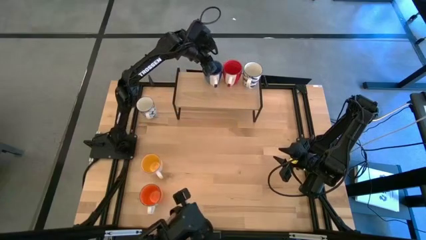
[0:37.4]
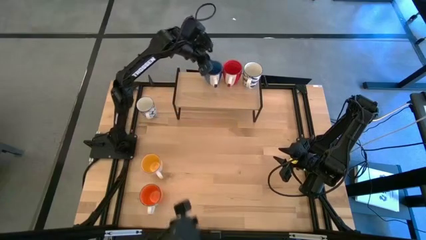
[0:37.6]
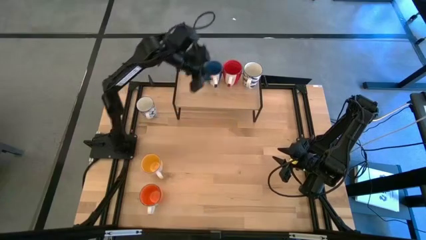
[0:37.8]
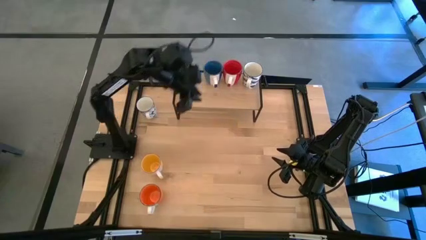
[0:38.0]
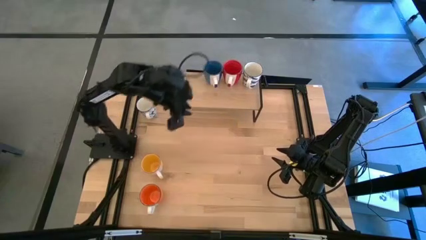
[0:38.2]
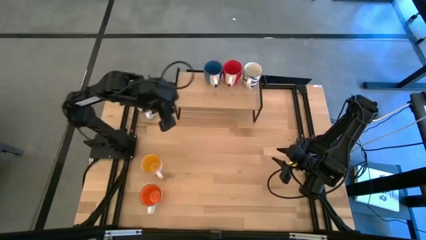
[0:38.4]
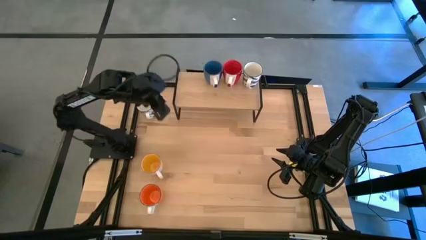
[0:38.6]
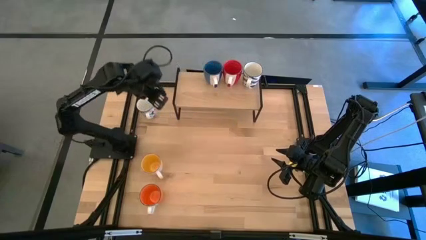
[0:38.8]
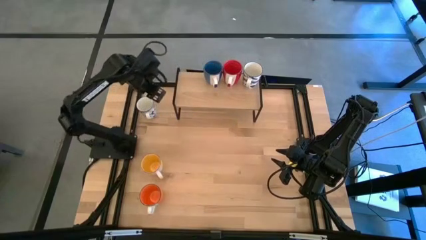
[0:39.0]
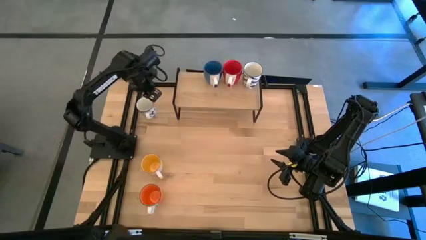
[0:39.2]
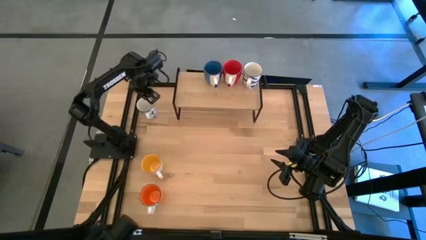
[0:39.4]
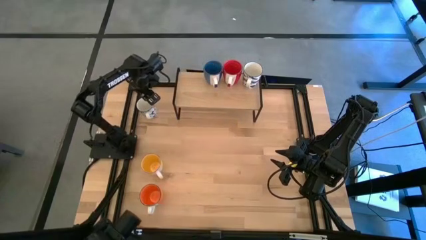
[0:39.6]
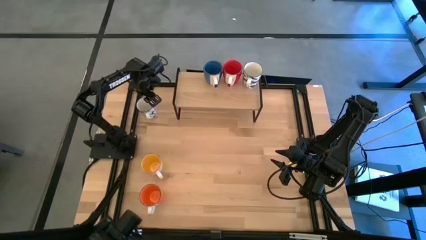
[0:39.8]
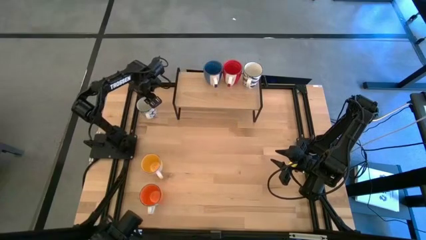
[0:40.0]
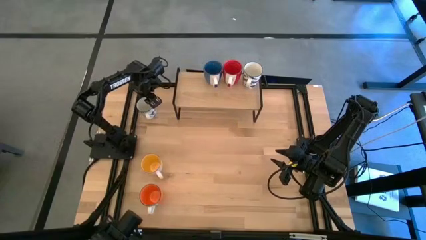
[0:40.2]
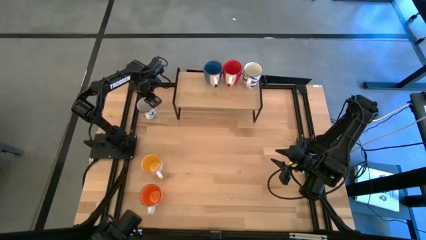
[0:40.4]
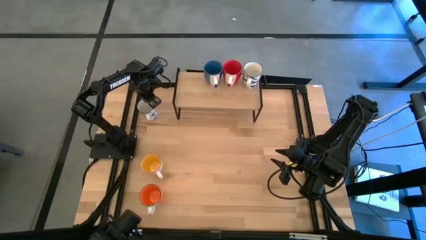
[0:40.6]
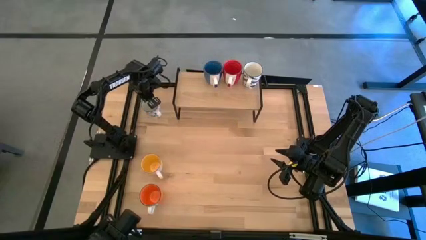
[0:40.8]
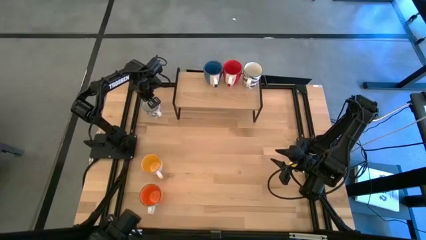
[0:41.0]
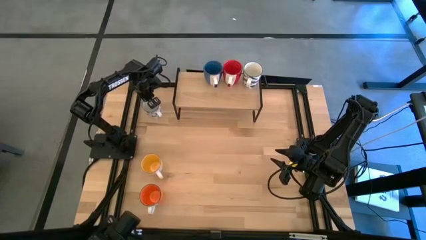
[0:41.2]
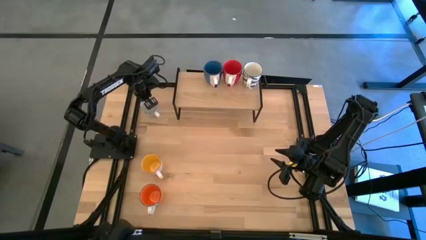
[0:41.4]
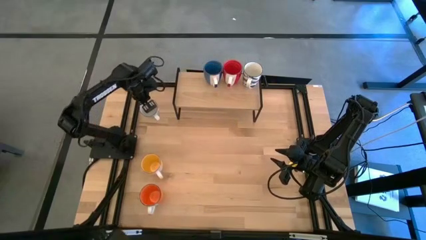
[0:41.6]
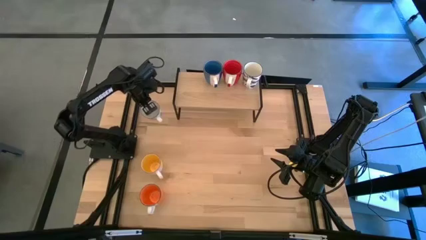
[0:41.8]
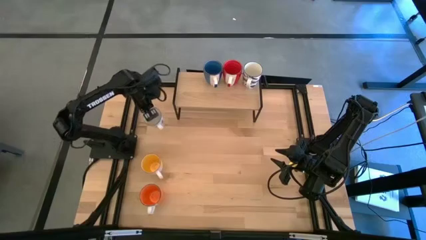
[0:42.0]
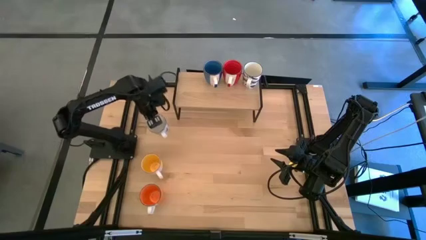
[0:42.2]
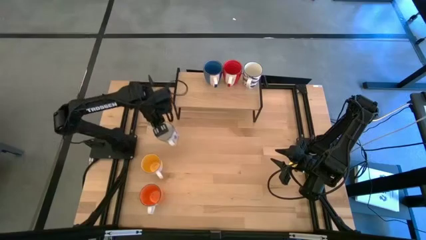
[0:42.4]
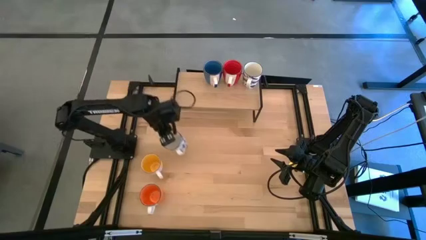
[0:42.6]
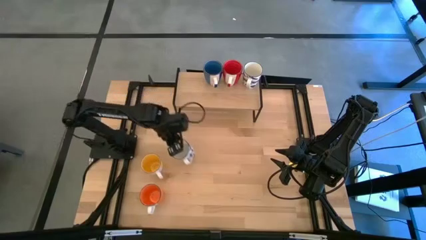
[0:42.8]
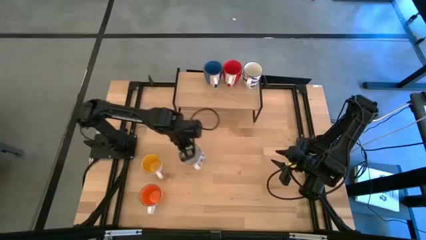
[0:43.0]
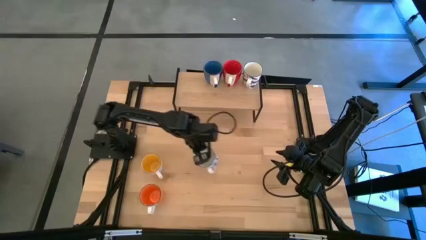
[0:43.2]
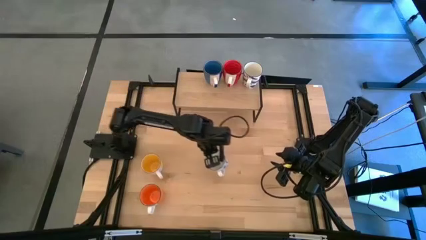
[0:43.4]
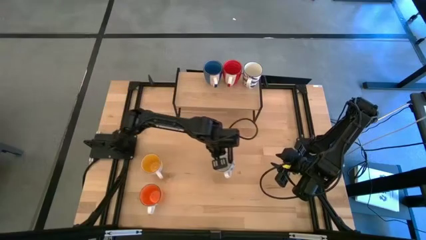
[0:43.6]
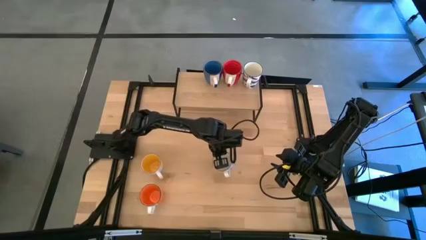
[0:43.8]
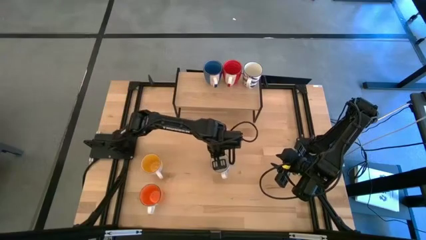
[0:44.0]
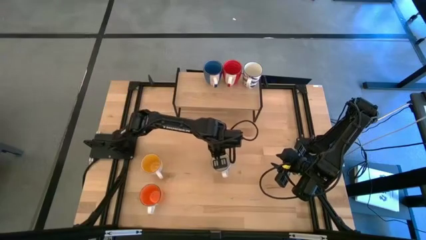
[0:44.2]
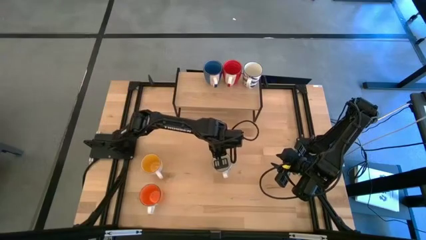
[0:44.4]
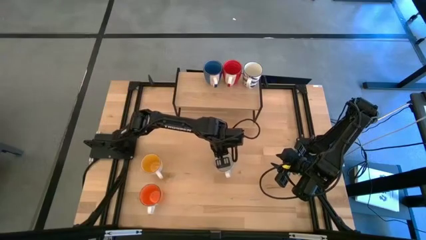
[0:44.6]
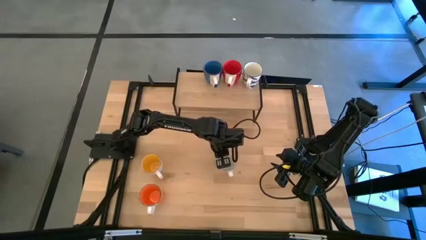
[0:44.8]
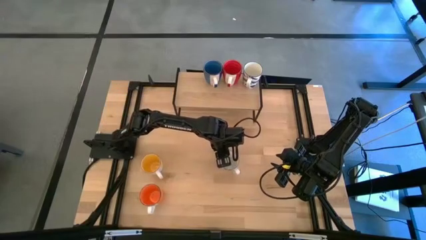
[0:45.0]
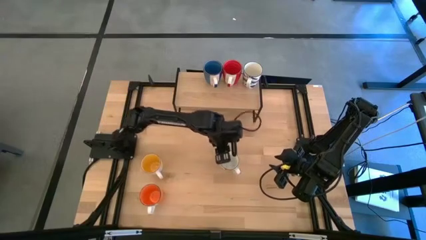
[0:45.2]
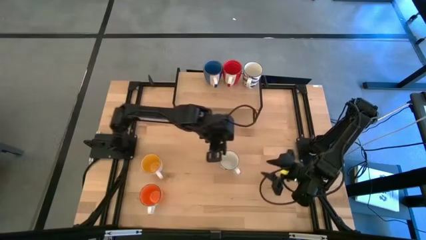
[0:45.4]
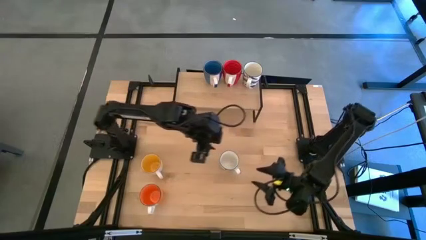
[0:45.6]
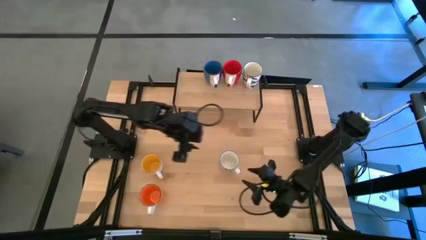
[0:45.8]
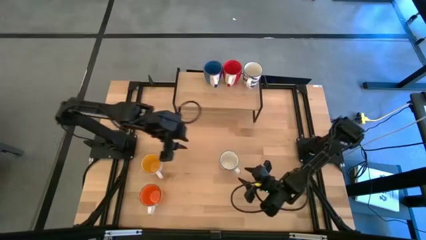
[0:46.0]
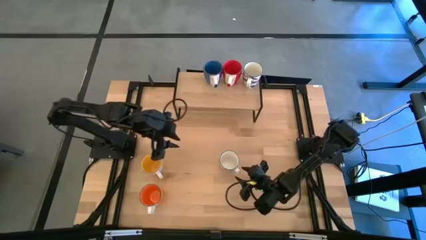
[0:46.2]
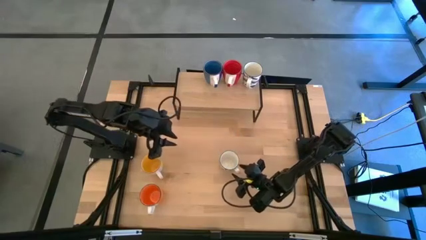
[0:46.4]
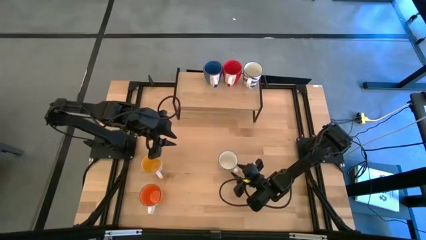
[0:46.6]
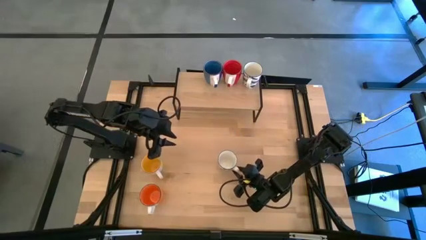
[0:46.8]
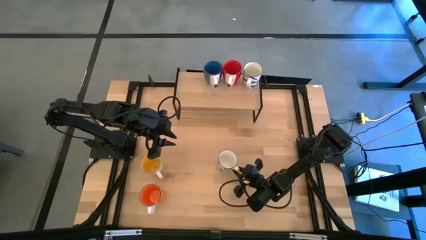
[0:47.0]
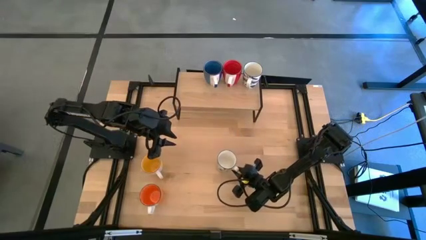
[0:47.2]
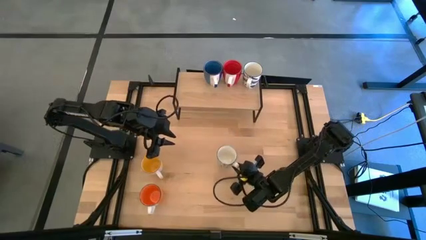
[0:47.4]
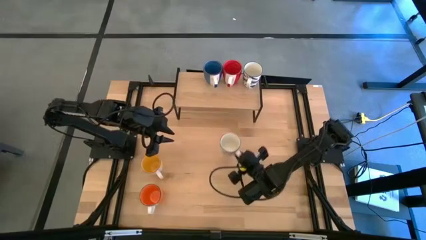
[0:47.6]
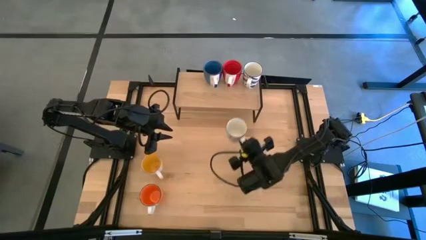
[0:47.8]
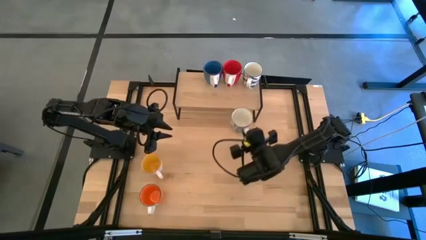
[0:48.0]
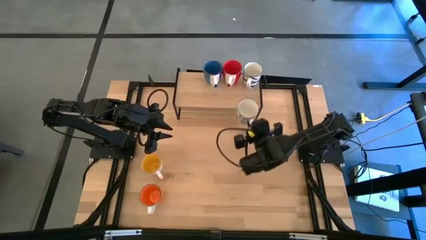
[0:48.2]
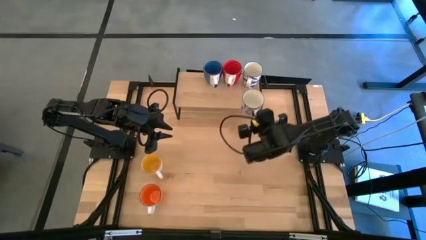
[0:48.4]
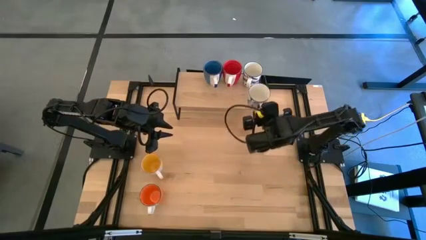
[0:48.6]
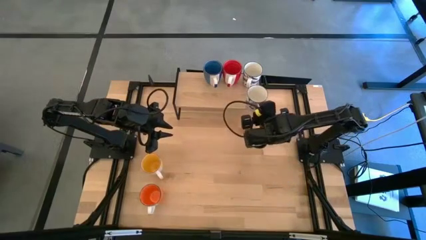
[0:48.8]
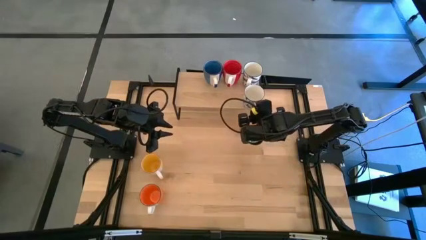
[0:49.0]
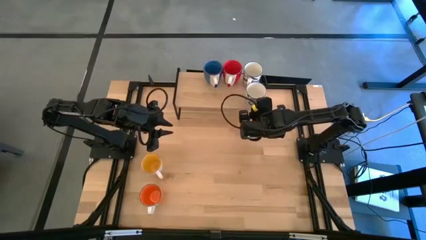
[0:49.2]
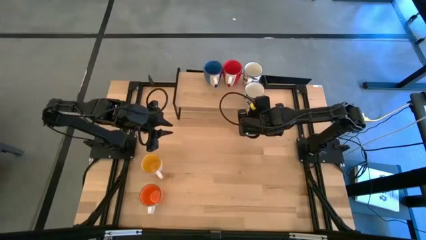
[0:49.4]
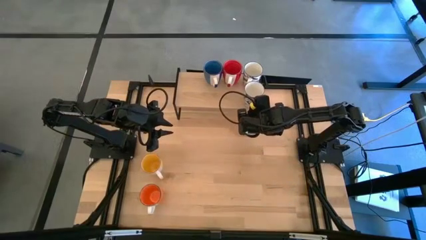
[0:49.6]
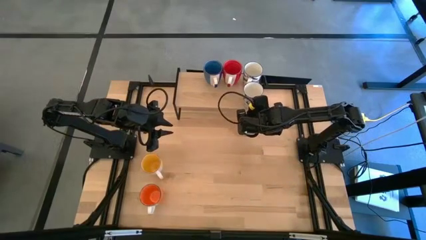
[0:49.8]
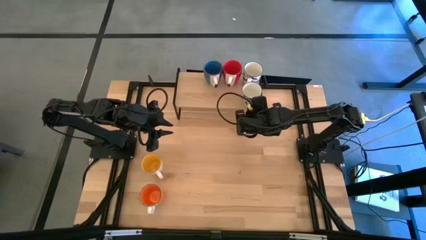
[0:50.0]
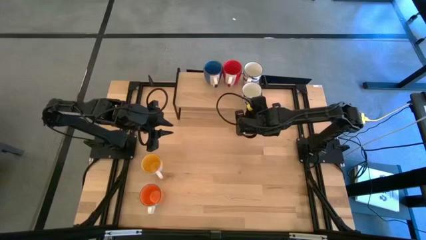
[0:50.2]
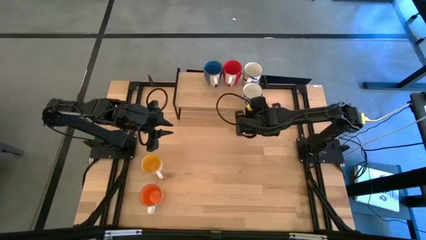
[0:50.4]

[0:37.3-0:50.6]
Task: Place coffee mugs
Put the white patterned mug on the shelf

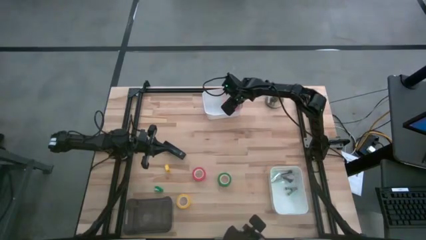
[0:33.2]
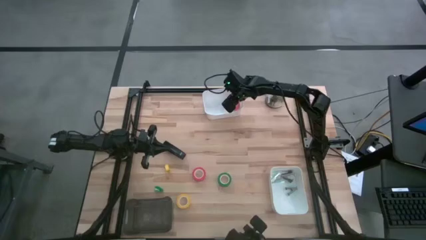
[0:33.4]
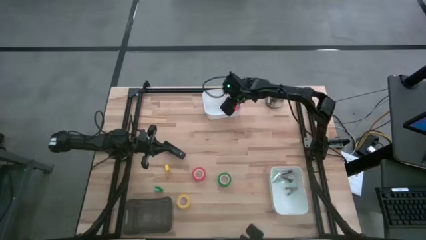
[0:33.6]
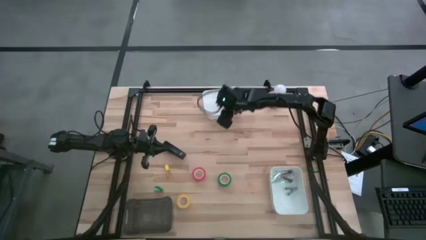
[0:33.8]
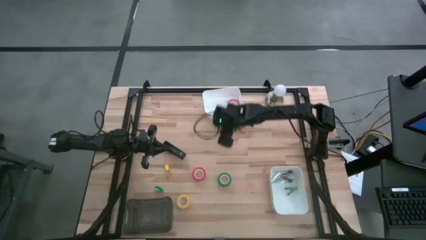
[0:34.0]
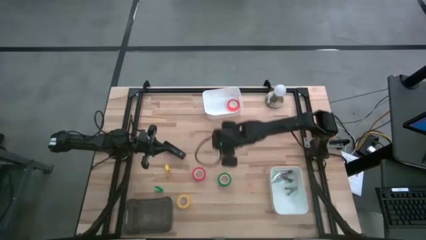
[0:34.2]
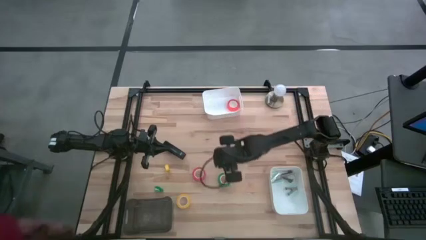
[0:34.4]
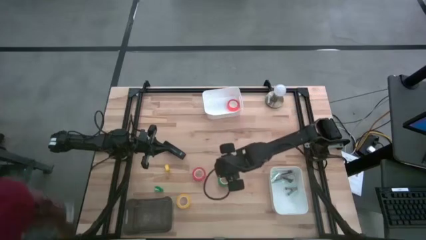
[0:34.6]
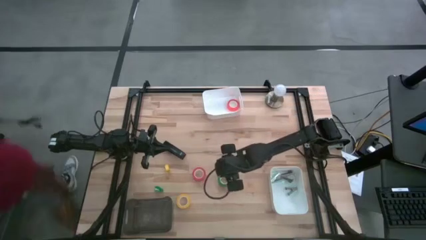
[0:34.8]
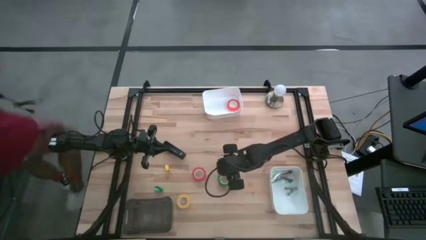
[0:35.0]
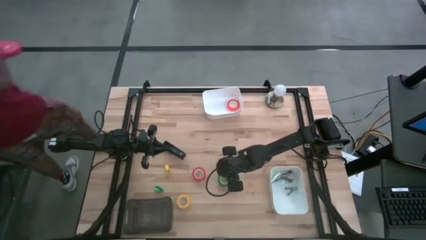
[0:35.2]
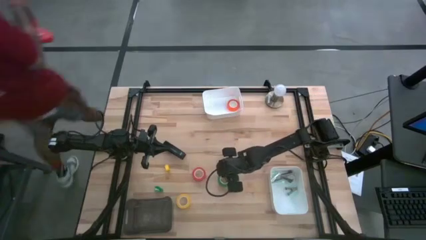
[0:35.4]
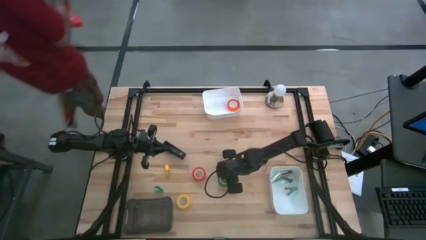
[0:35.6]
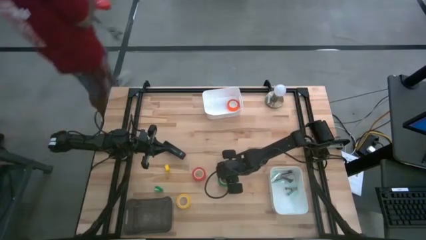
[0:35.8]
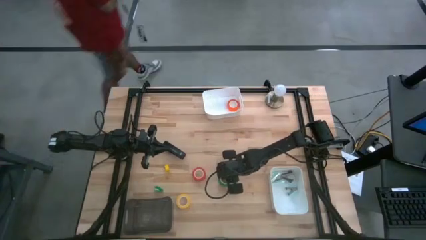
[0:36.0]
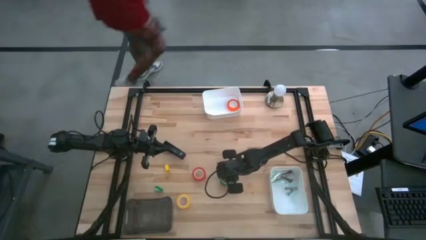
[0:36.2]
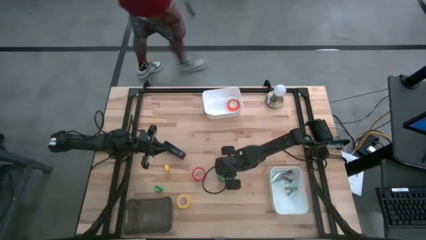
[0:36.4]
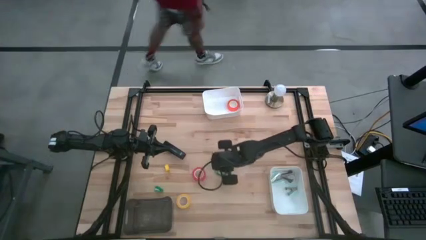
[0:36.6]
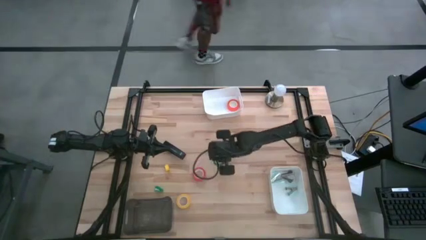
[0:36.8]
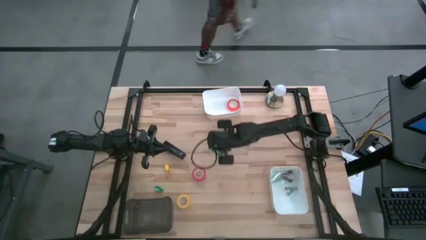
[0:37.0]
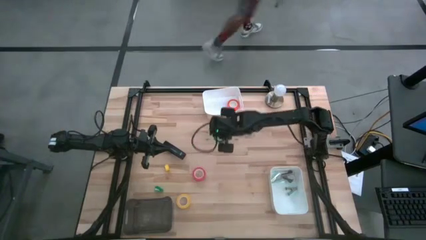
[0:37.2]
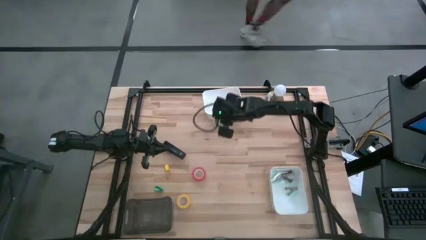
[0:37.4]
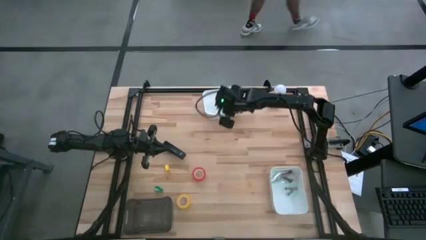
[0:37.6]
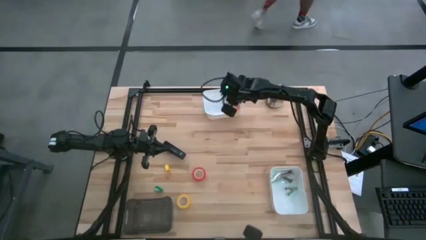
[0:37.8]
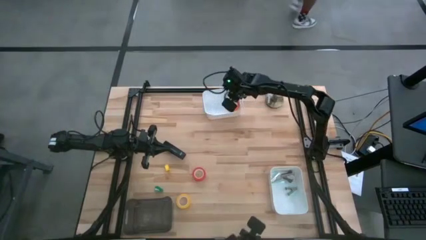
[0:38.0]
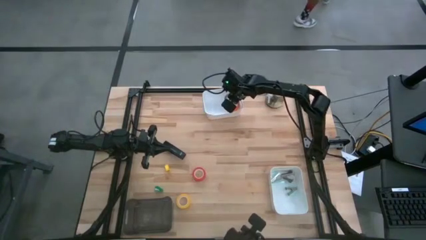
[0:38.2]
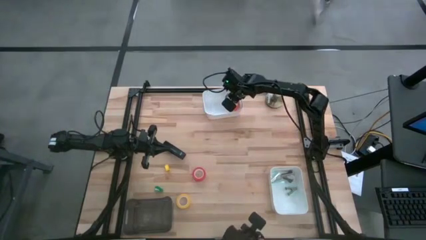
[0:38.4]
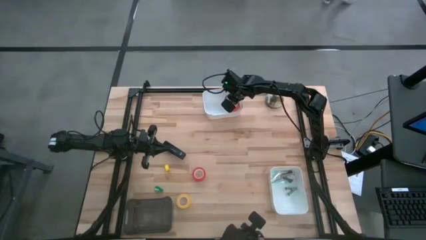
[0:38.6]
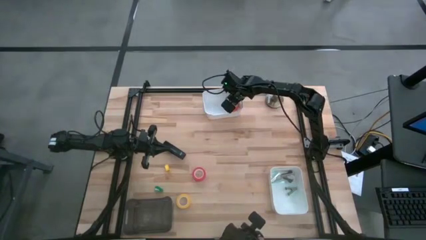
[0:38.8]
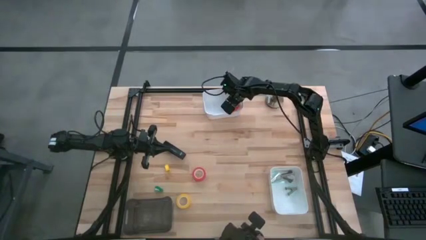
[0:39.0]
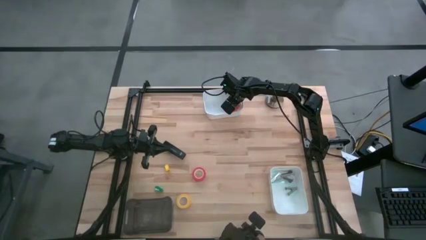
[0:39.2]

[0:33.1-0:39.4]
Task: Pick and place Stapler, Stapler remover, tape
Put the green tape into the white bin
